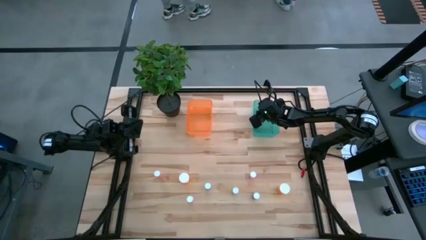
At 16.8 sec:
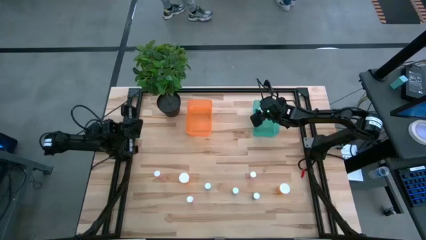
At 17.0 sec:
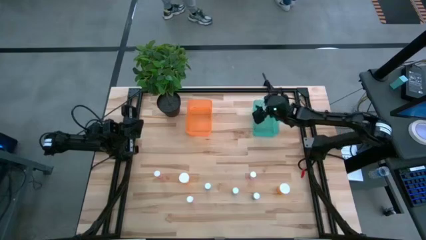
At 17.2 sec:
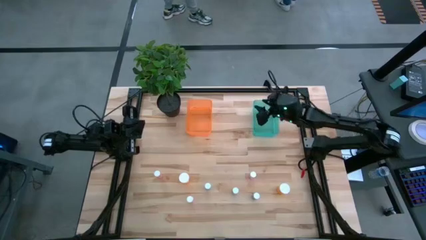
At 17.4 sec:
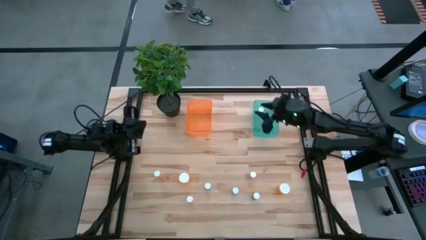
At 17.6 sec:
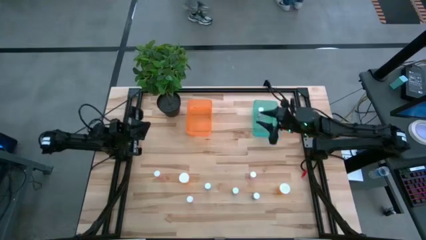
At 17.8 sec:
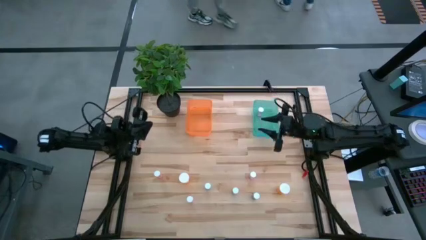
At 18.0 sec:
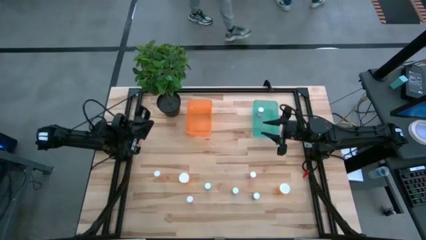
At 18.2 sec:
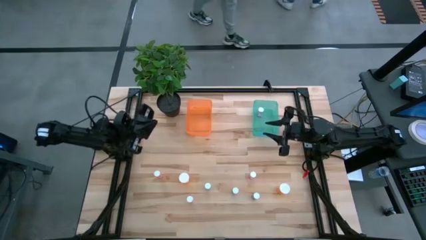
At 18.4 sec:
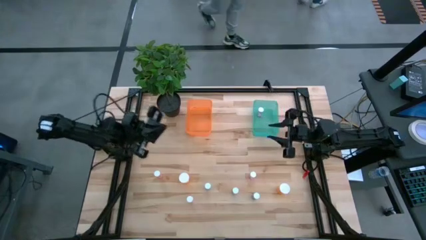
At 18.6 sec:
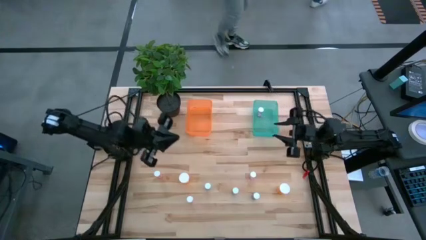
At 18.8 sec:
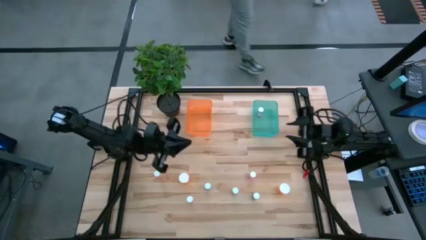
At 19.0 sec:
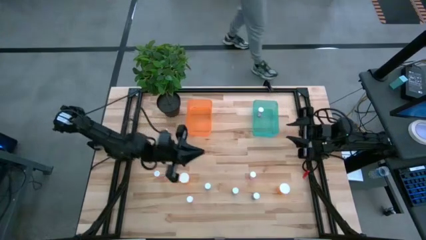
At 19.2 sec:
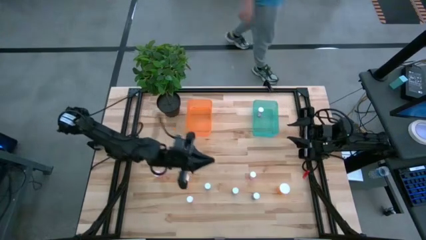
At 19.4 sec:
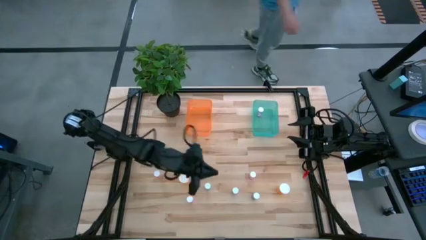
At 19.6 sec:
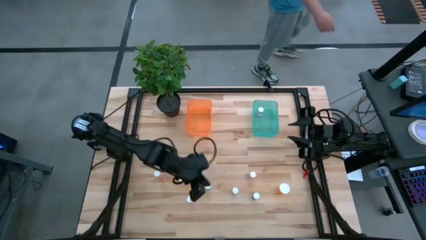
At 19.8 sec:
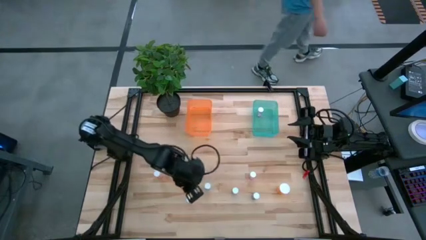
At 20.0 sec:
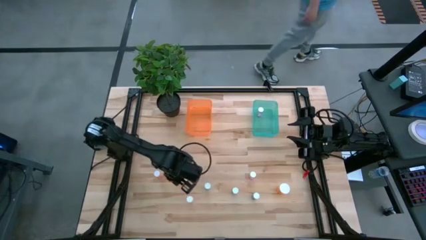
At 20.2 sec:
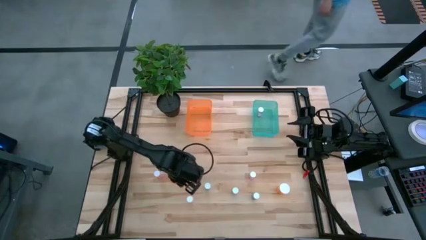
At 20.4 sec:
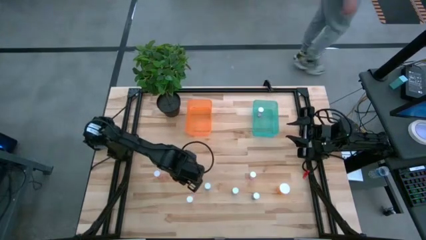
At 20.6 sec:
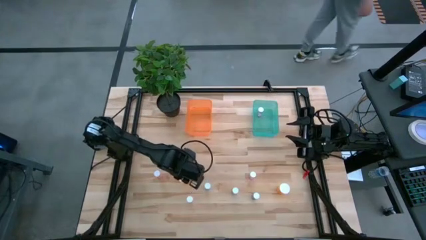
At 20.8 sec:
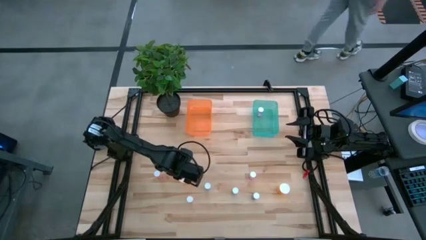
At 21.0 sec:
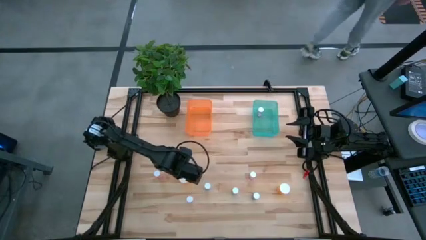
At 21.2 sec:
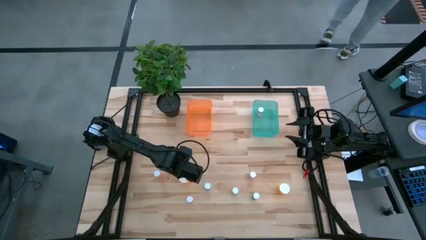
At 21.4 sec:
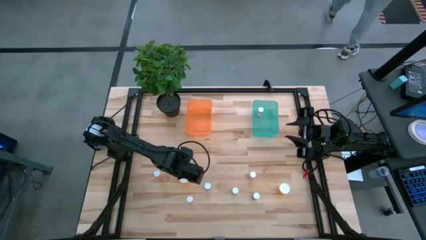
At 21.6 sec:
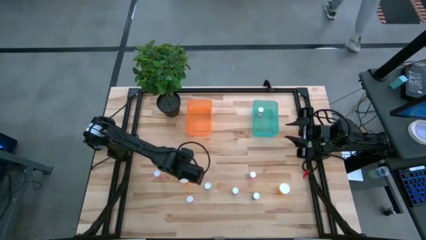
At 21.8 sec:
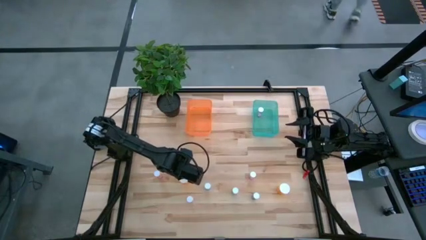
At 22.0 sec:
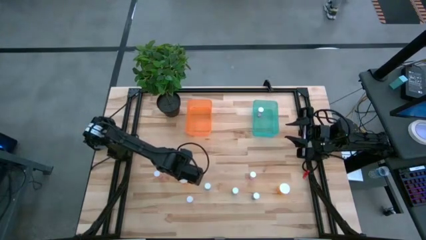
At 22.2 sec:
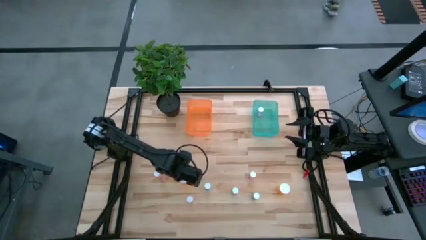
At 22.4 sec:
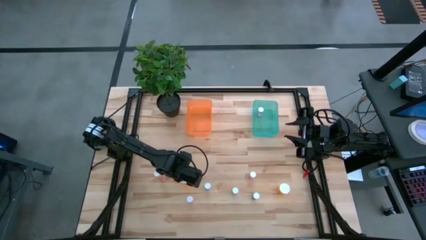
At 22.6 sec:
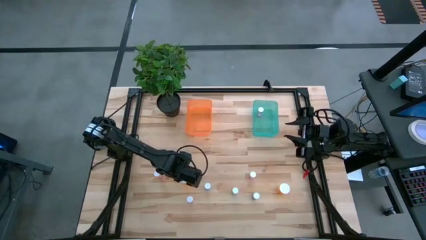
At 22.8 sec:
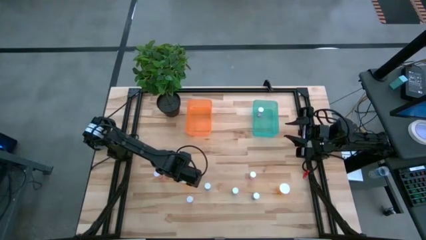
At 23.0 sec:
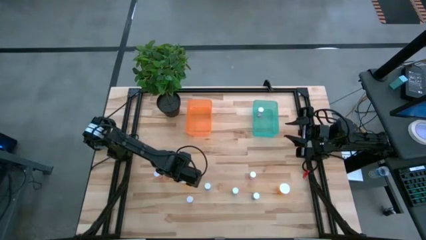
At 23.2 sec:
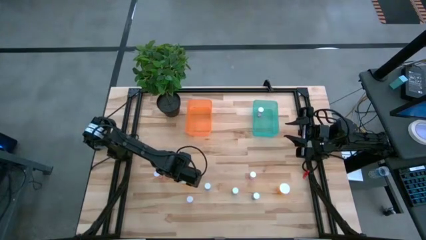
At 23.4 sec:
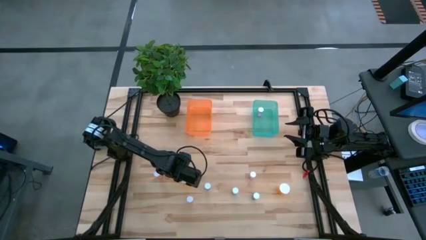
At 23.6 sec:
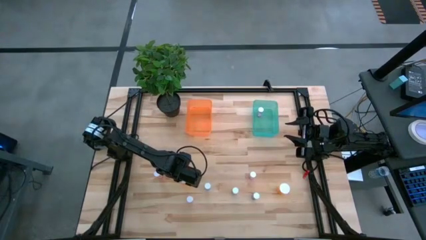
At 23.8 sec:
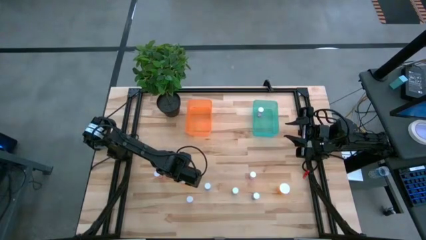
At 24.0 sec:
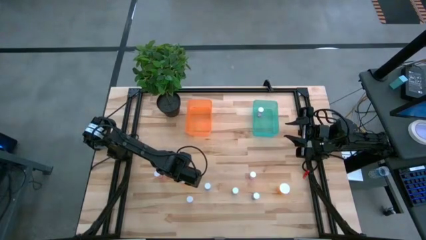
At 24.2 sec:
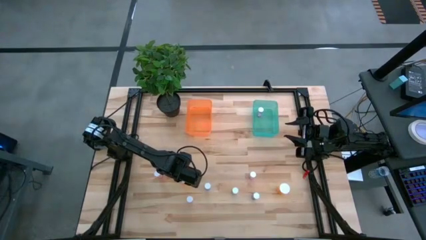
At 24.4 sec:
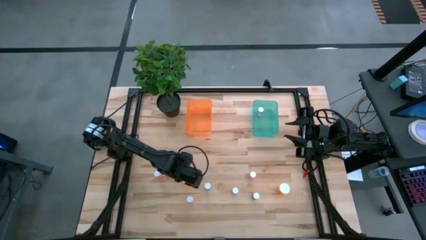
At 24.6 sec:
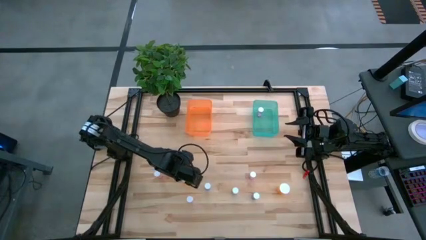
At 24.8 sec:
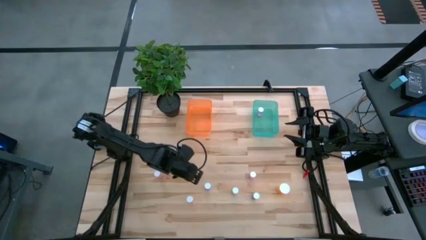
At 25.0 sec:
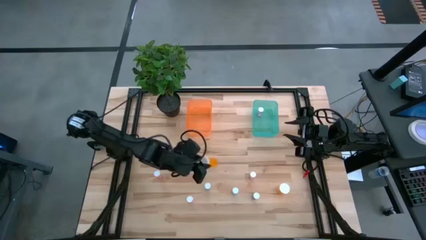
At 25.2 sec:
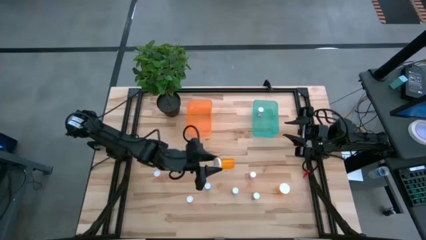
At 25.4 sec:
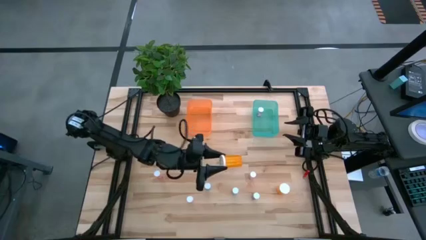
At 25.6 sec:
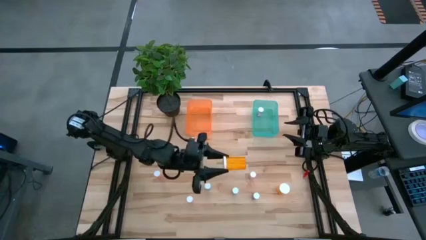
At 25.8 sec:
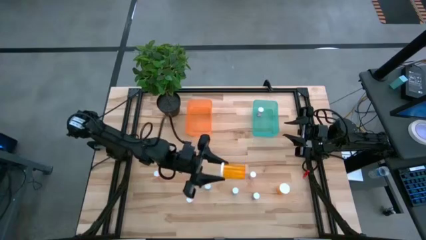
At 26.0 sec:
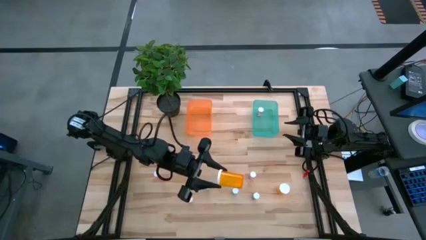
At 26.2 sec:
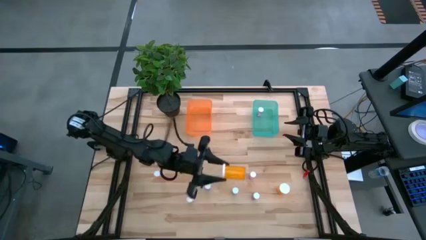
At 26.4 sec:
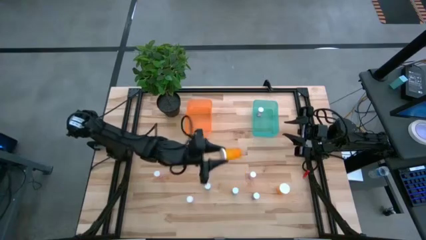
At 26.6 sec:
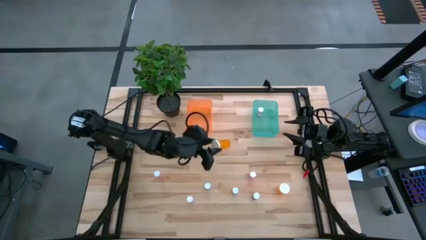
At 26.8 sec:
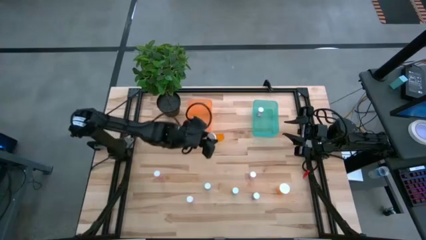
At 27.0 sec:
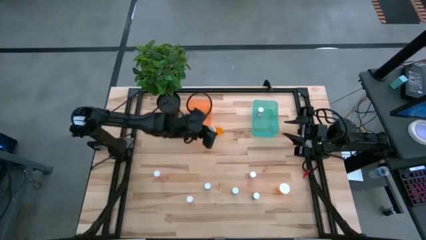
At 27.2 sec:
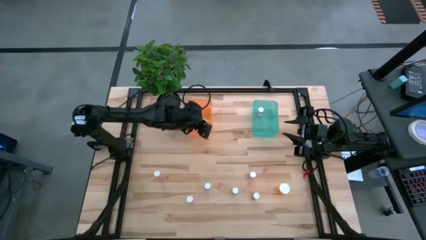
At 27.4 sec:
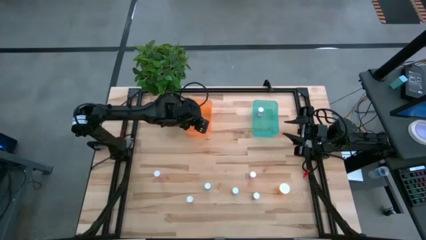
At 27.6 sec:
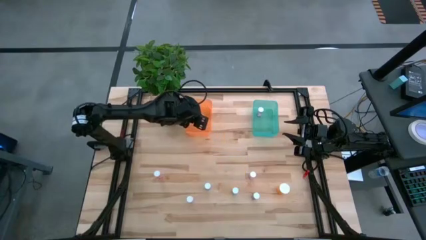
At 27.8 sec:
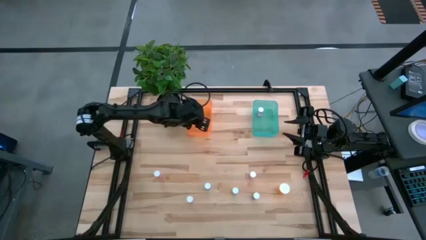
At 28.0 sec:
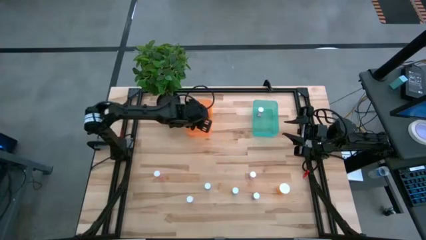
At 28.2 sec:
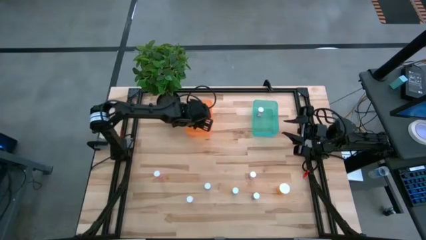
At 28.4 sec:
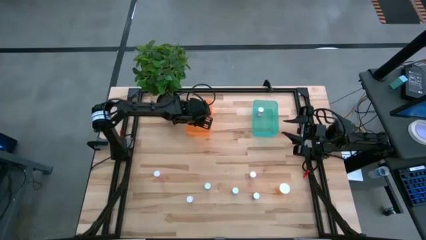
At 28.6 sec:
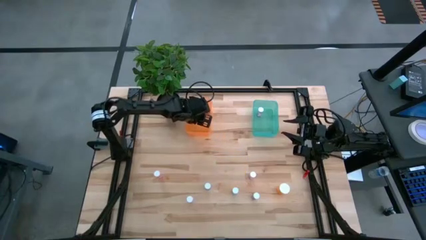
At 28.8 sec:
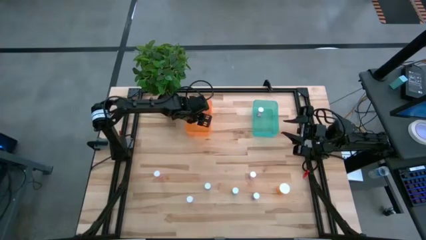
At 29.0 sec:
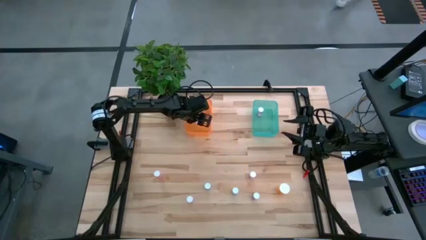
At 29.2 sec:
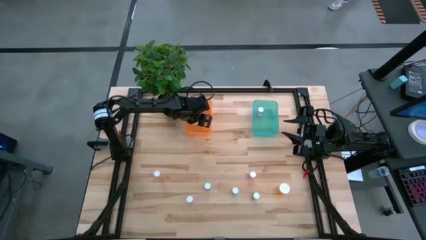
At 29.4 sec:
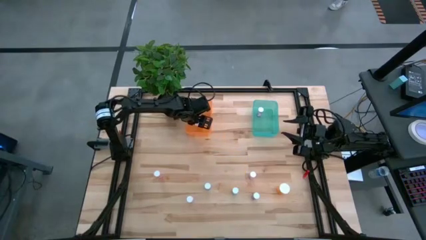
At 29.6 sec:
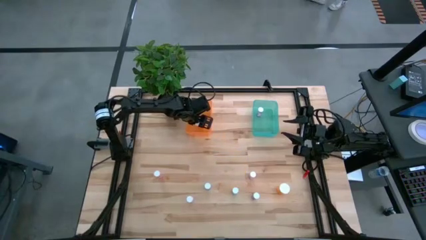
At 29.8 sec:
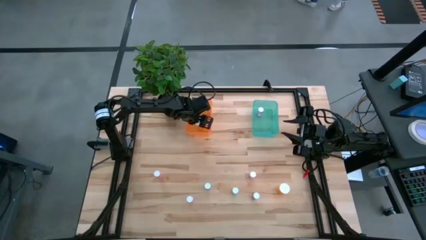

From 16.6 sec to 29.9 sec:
Task: Pick and place medicine bottles into bin by pill shape (circle, oval)
Put the left orange capsule bottle into the orange bin
